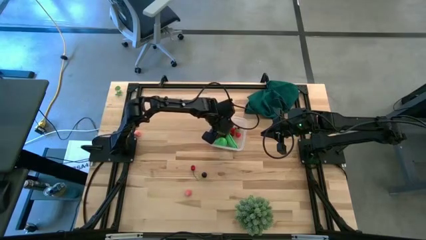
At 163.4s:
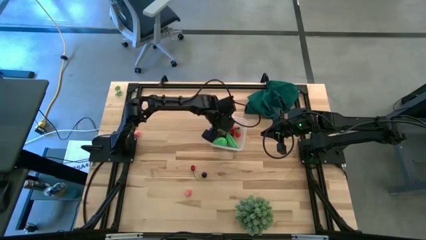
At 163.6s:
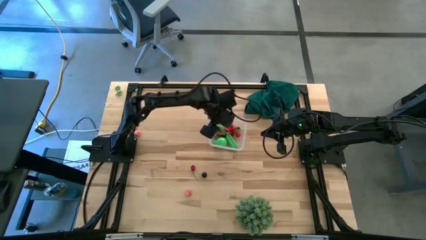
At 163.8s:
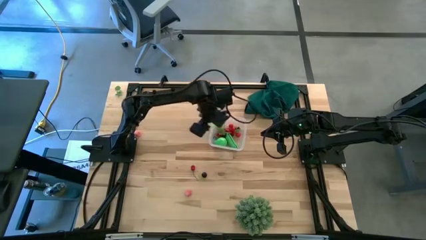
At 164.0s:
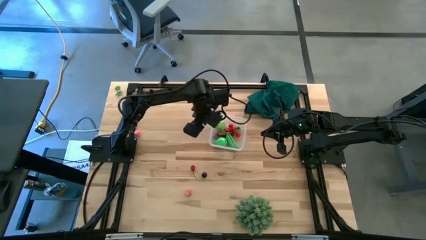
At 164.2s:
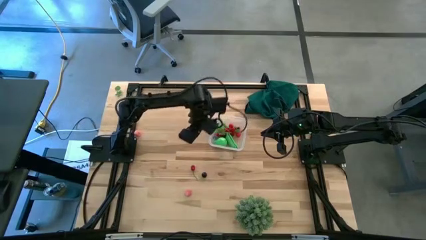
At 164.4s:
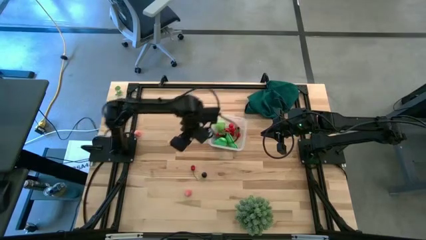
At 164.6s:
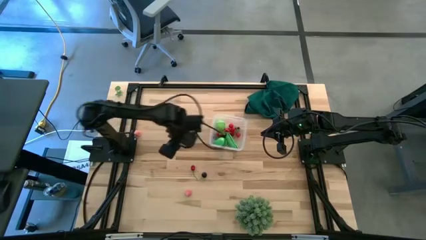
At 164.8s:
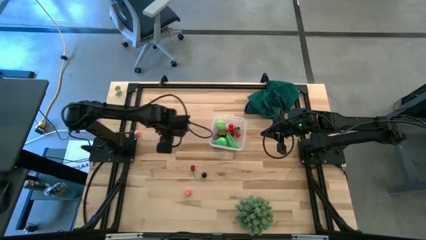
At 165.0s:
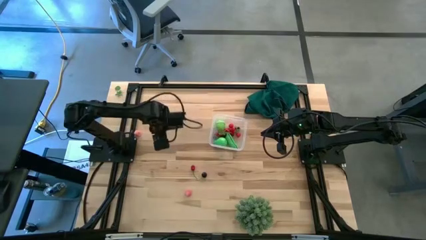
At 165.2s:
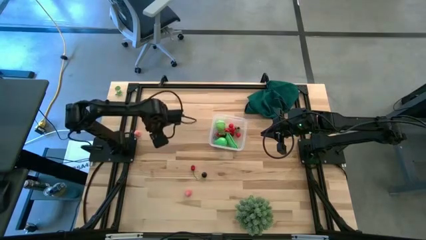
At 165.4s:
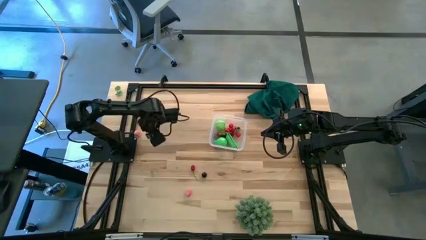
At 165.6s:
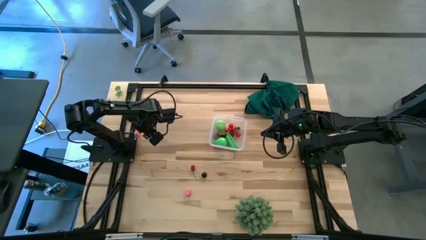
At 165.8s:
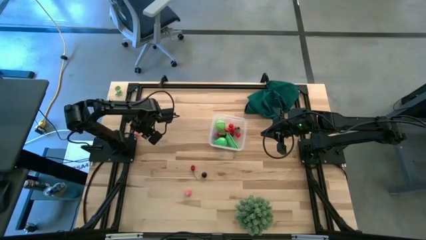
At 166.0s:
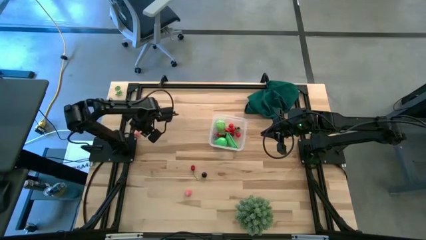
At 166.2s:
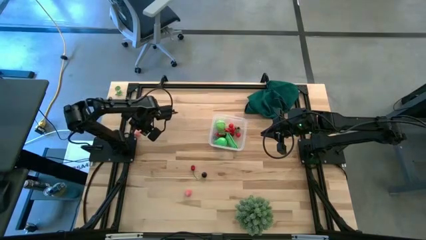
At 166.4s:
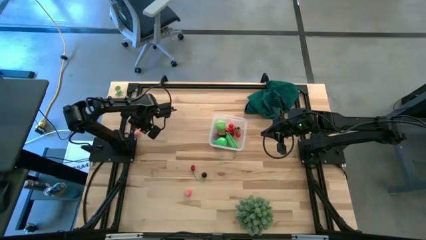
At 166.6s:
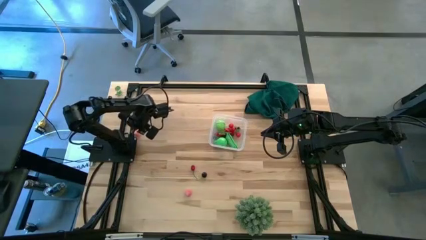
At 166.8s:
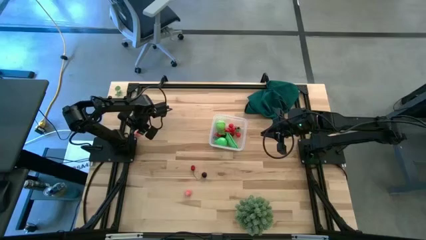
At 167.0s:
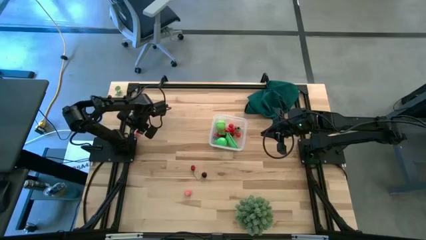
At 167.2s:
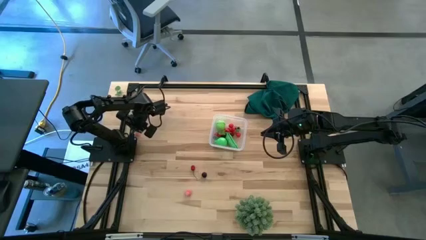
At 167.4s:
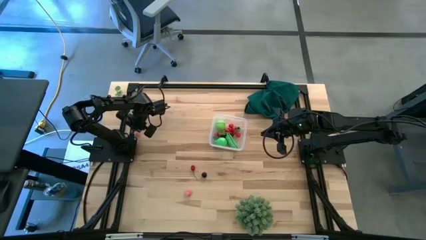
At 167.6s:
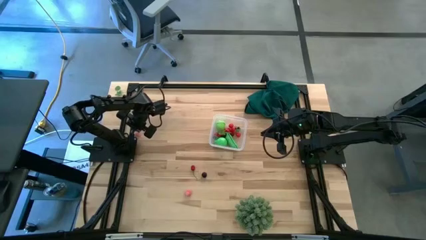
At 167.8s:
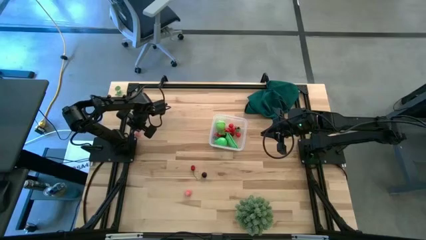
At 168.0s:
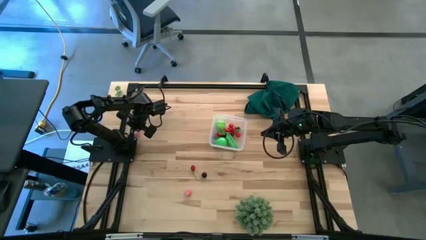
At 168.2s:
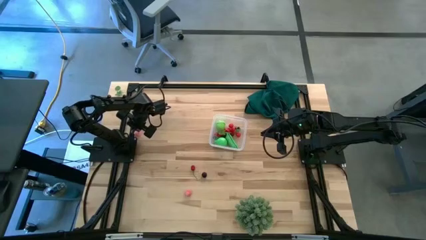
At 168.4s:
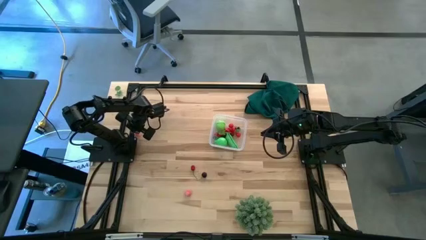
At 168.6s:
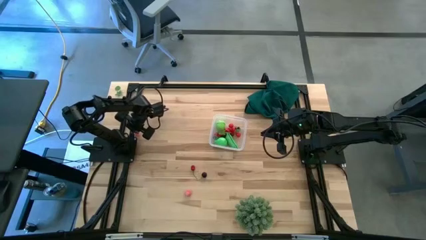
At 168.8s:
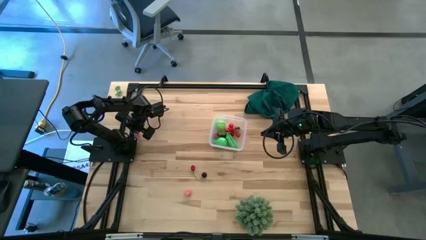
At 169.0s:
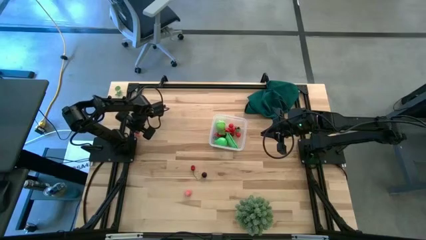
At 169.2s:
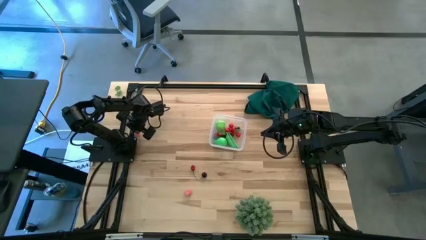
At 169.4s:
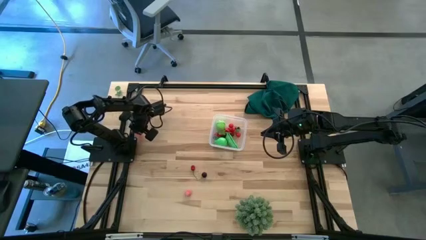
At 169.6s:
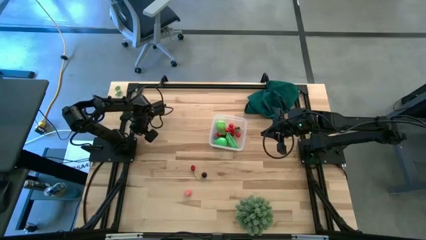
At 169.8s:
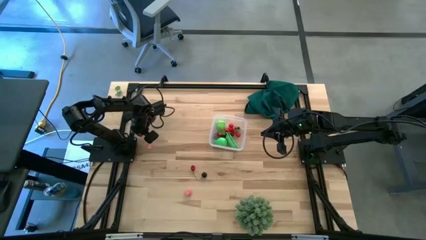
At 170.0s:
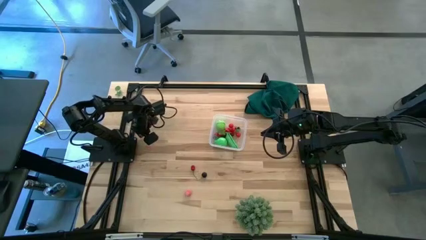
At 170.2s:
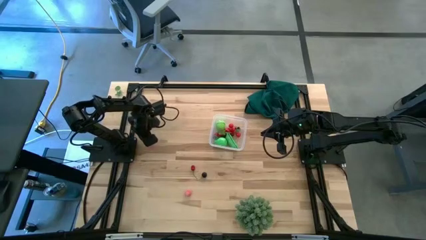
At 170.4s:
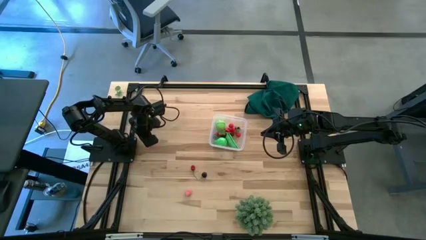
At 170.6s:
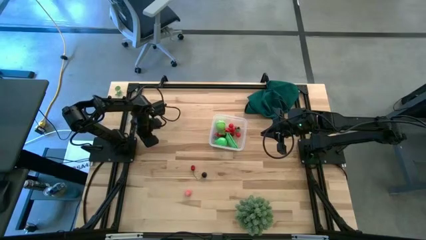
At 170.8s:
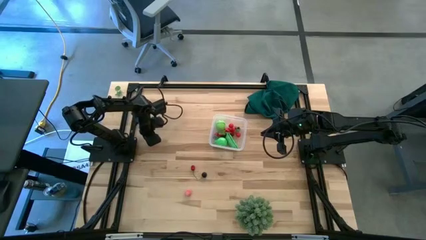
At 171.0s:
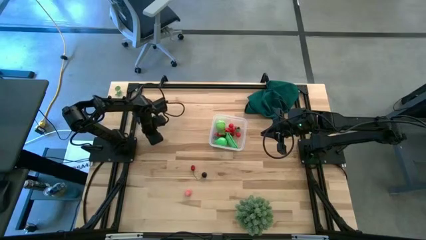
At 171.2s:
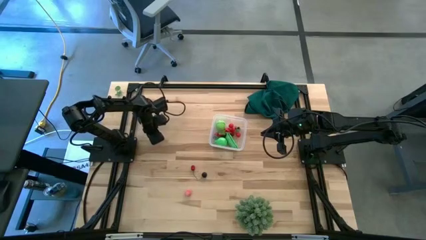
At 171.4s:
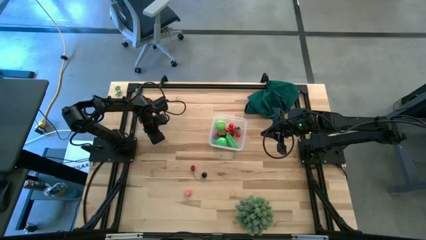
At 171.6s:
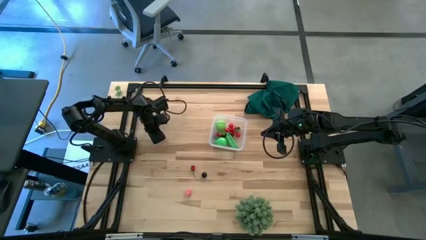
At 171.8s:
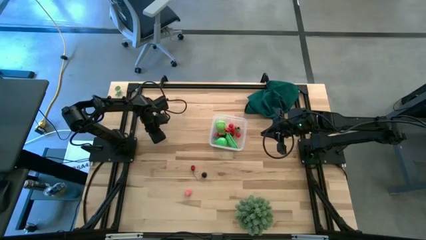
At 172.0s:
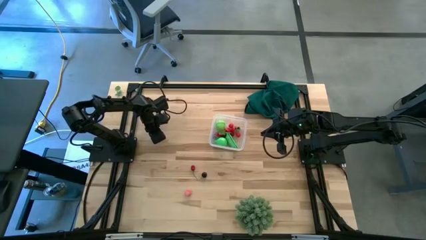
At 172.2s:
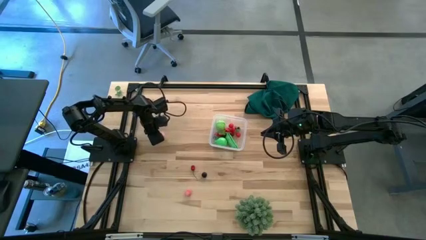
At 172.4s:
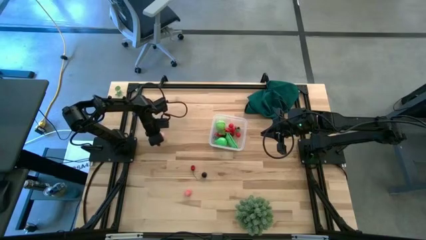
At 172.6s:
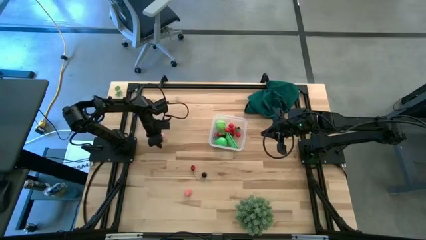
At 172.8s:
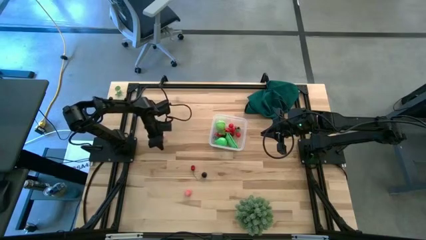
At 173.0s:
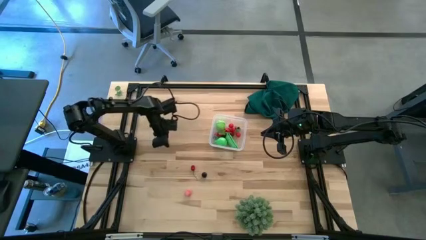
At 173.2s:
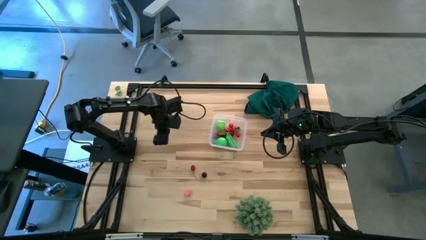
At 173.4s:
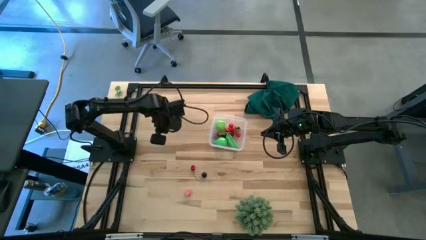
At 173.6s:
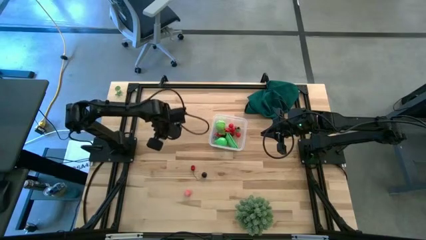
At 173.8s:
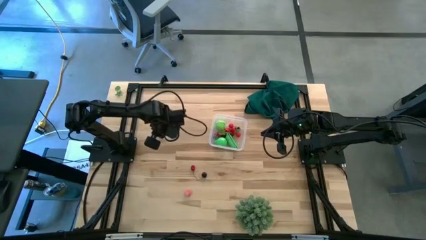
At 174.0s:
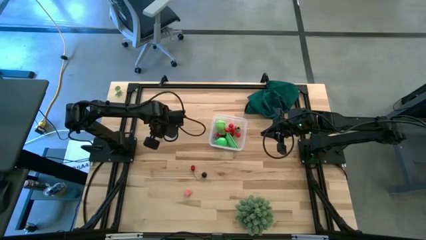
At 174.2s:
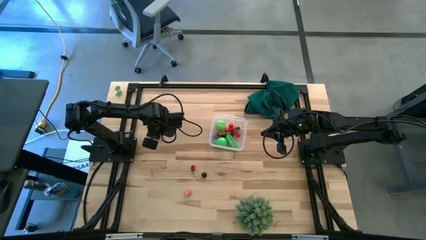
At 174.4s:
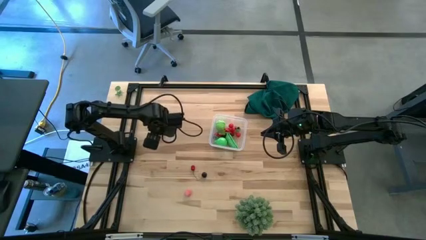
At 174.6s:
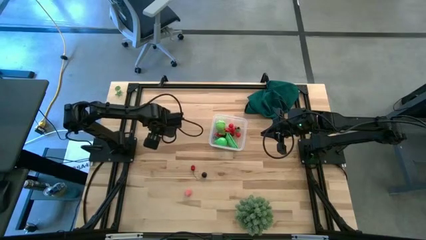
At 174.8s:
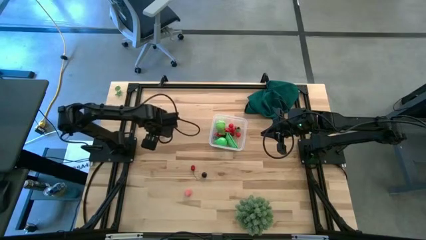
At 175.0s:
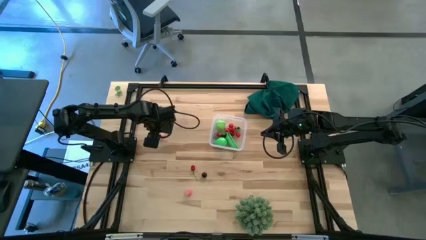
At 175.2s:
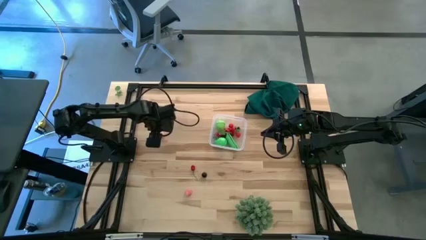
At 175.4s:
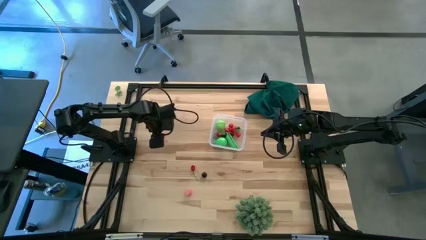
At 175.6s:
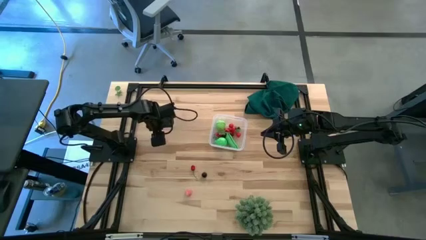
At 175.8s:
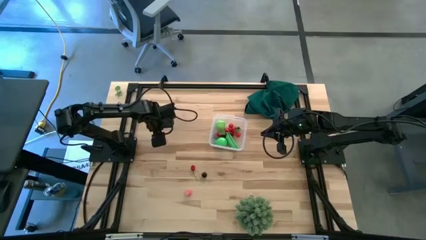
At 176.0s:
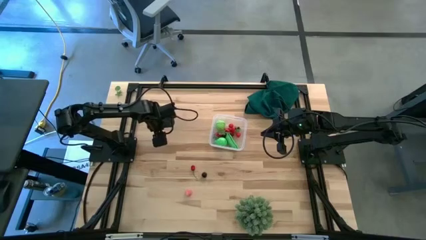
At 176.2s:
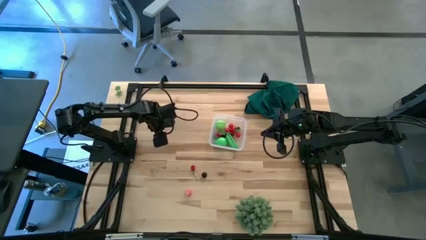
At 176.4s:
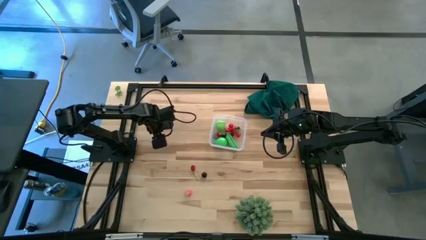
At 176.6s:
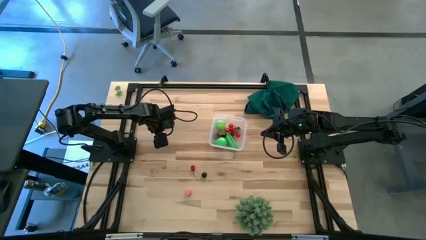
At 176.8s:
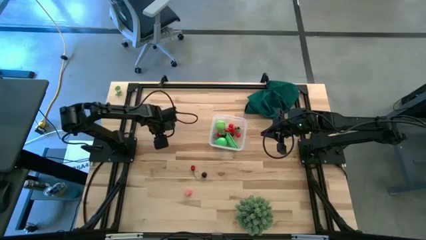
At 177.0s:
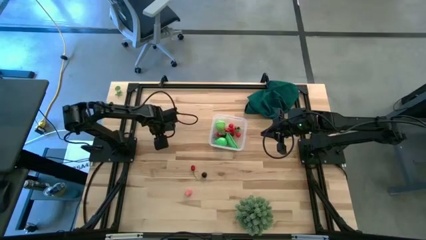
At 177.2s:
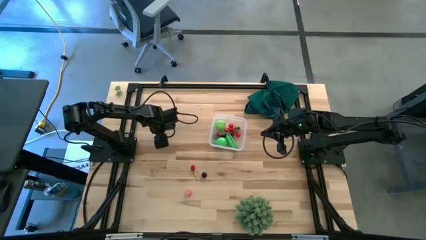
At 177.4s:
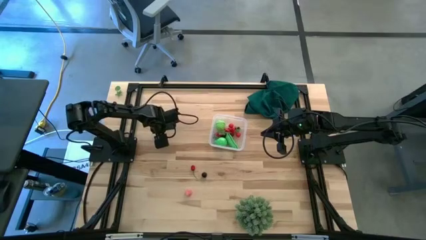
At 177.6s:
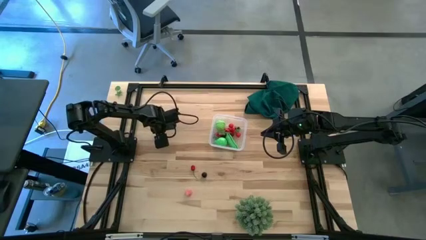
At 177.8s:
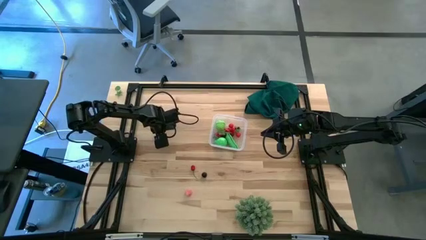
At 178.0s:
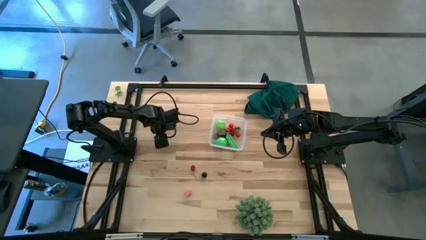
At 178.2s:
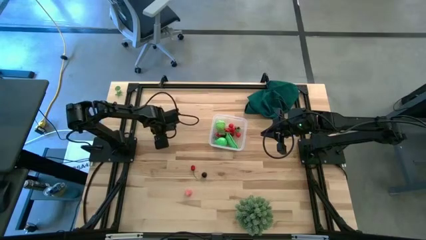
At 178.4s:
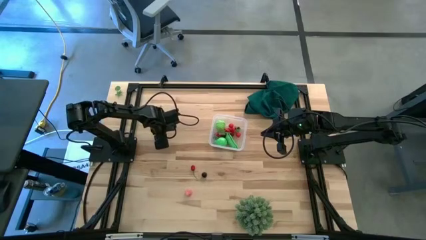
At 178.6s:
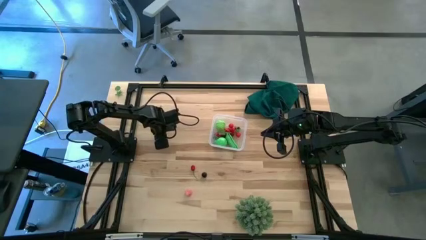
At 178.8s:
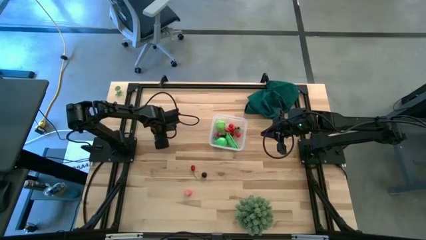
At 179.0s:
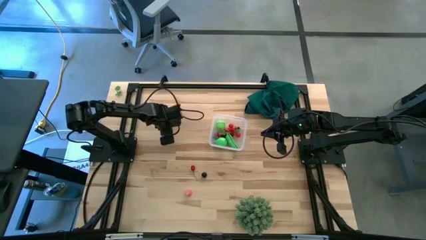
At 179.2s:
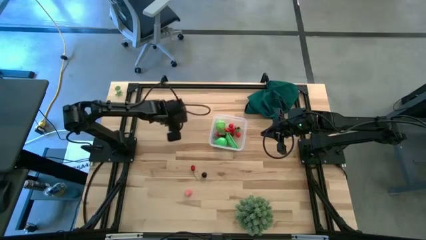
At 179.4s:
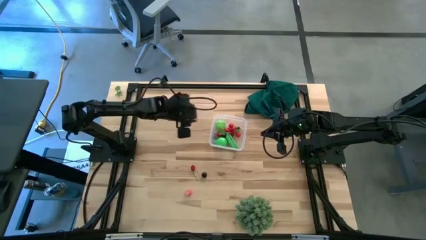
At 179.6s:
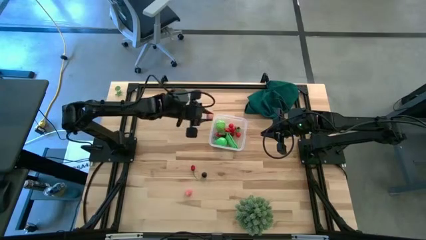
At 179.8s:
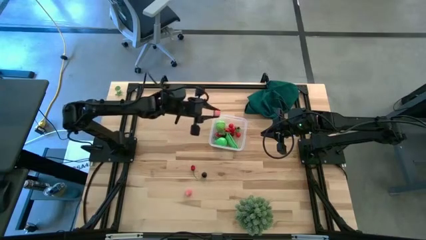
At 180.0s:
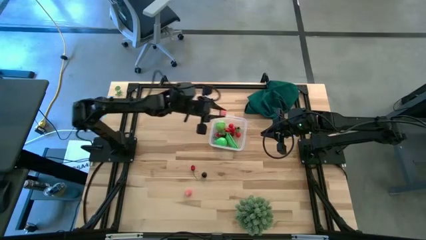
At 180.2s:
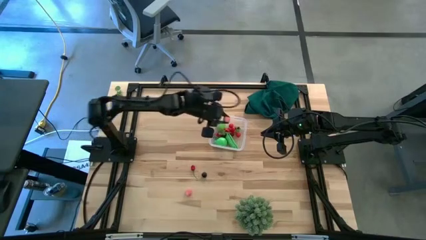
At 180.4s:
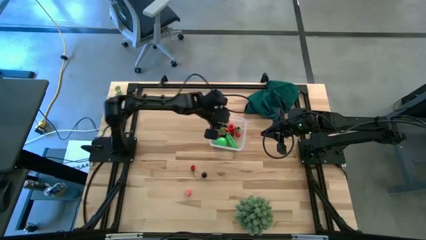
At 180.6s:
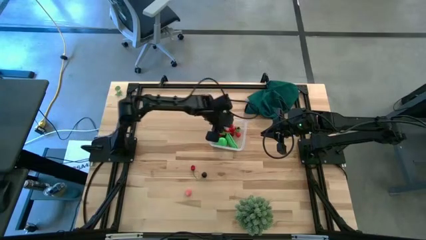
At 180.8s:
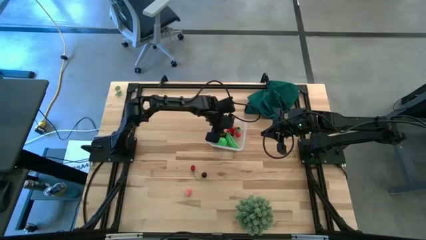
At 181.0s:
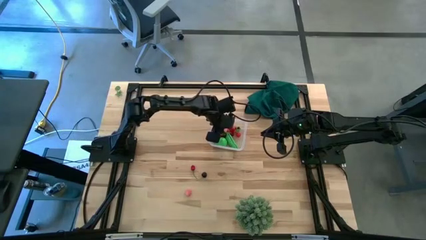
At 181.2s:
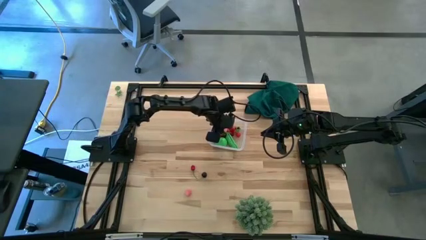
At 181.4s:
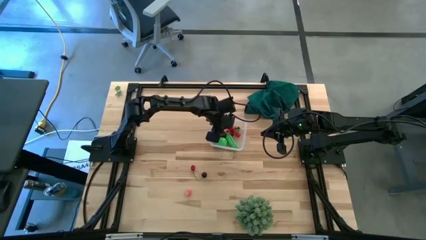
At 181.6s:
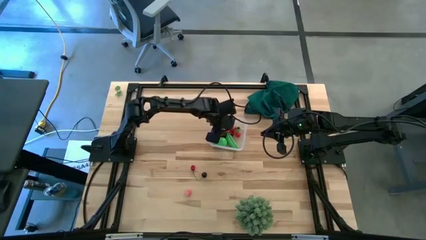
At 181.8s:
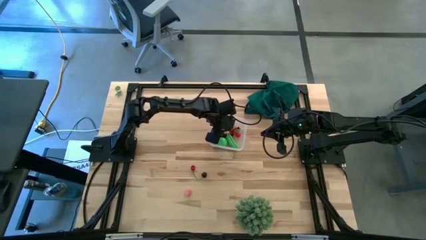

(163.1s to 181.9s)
Task: Pick and placing Produce into tupperware
Put the pink peach into the transparent bin
